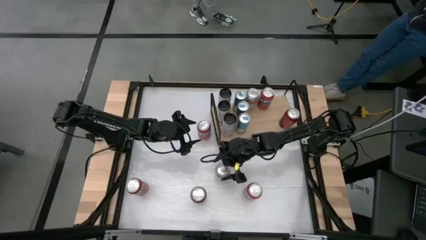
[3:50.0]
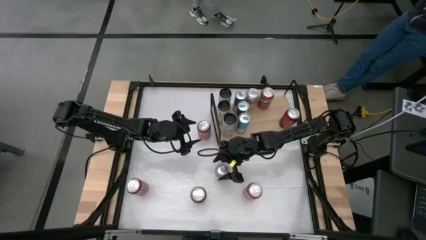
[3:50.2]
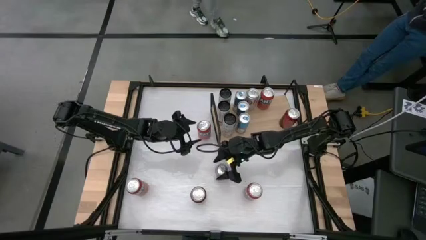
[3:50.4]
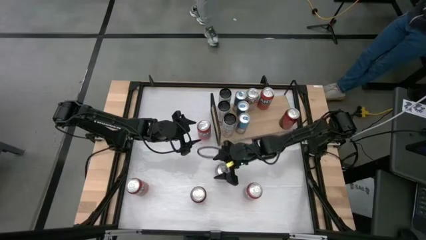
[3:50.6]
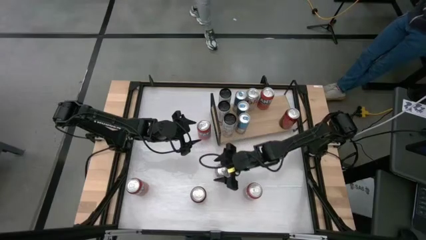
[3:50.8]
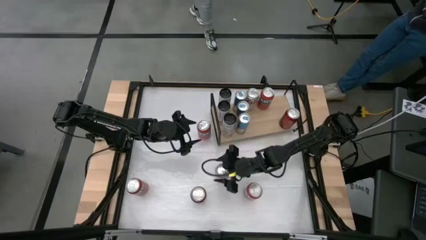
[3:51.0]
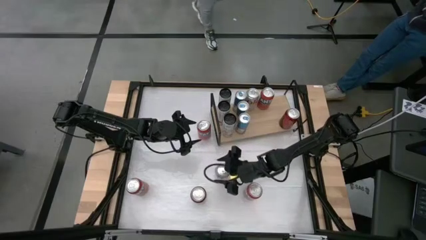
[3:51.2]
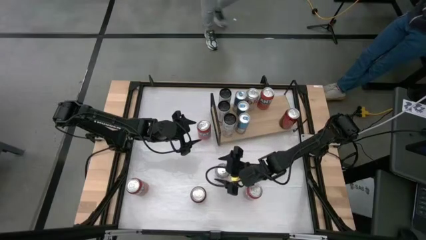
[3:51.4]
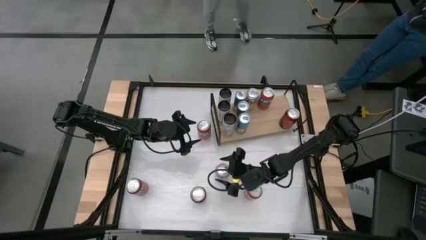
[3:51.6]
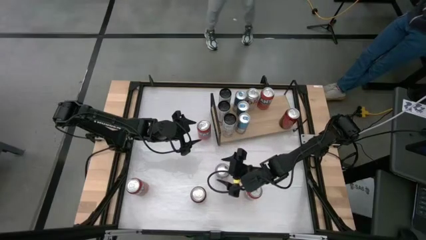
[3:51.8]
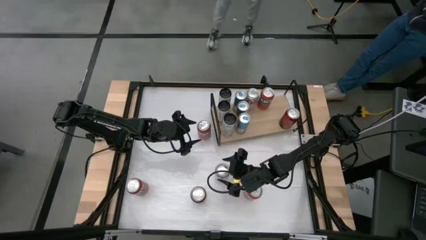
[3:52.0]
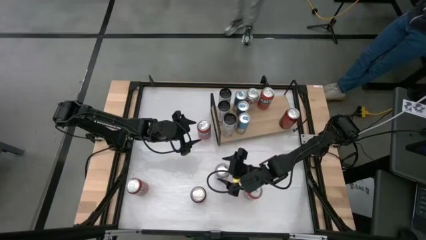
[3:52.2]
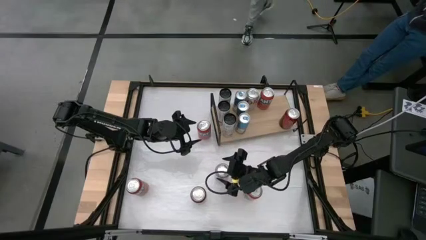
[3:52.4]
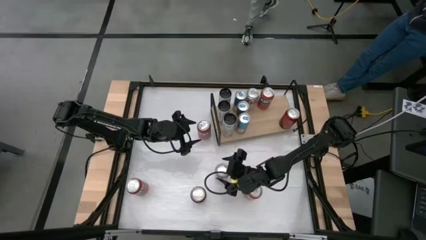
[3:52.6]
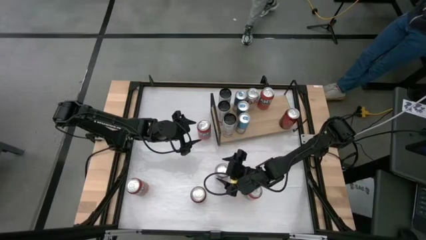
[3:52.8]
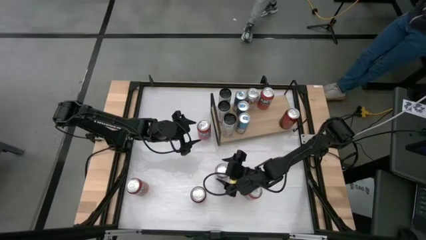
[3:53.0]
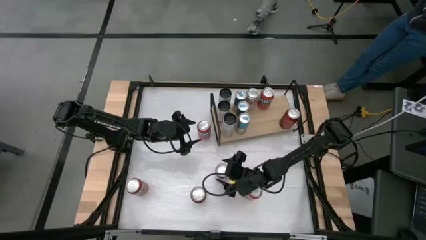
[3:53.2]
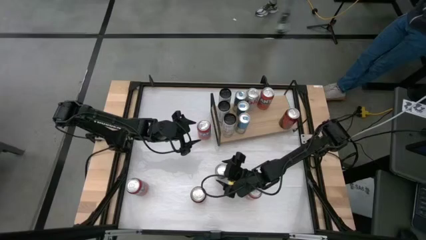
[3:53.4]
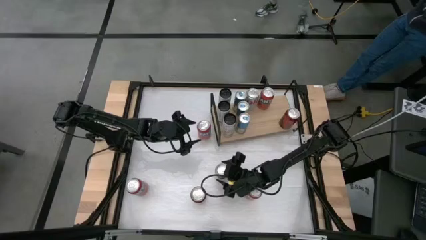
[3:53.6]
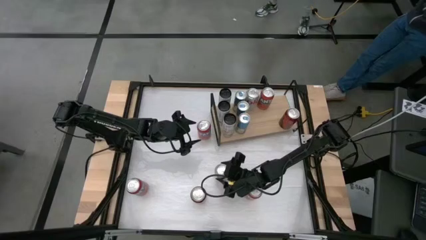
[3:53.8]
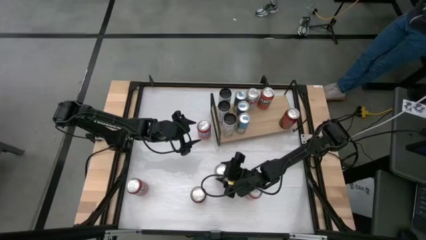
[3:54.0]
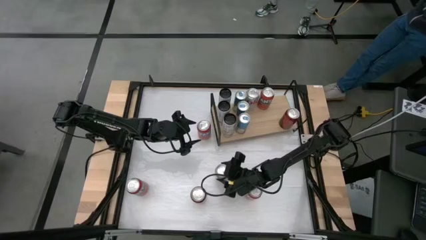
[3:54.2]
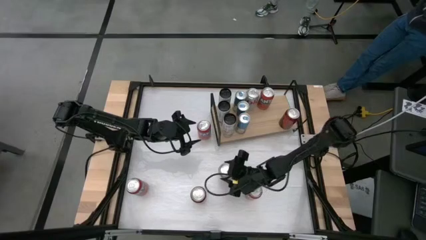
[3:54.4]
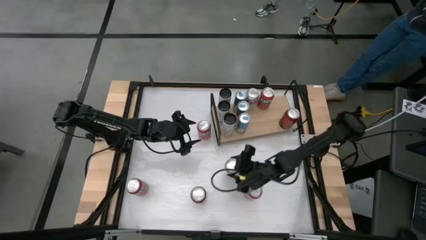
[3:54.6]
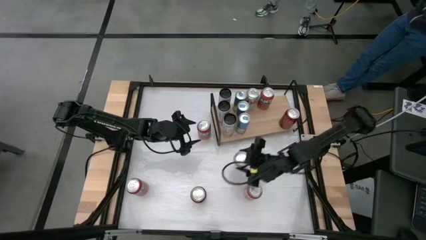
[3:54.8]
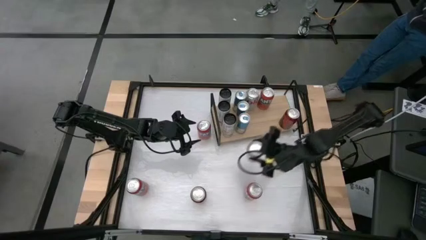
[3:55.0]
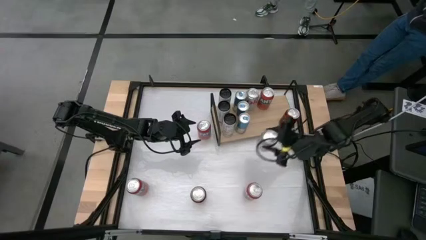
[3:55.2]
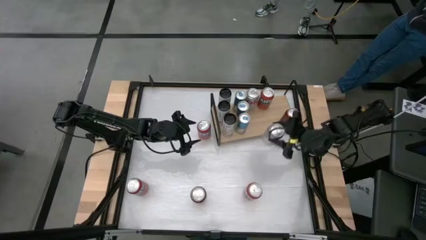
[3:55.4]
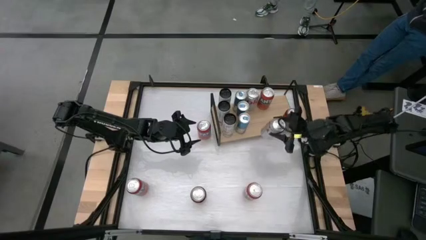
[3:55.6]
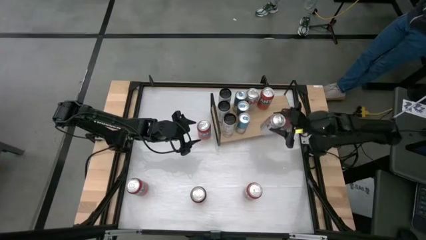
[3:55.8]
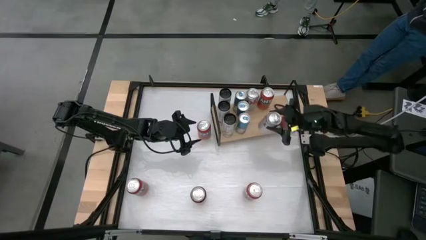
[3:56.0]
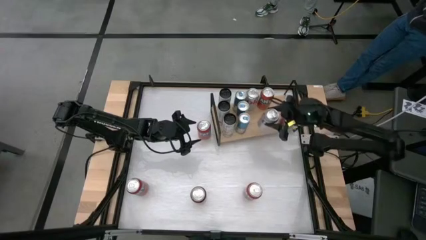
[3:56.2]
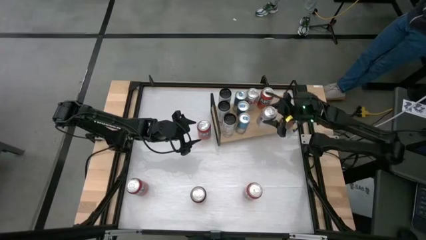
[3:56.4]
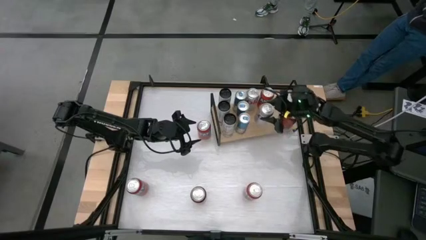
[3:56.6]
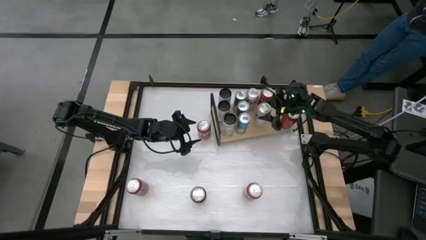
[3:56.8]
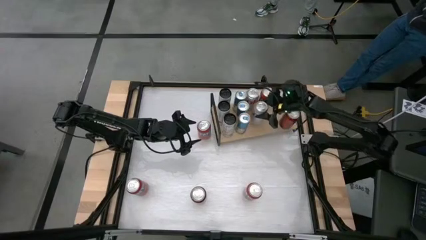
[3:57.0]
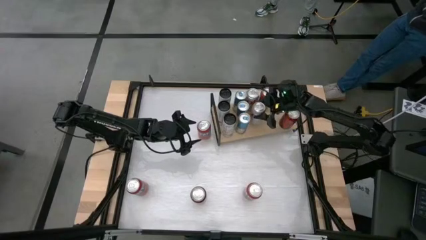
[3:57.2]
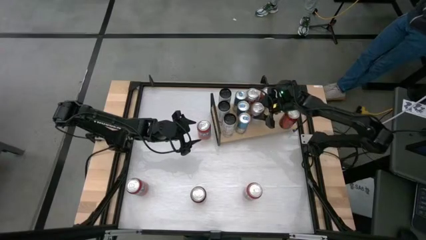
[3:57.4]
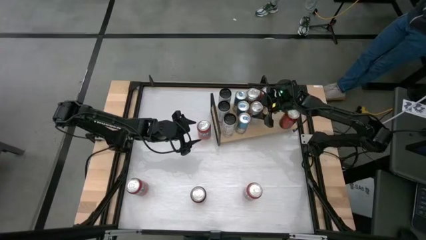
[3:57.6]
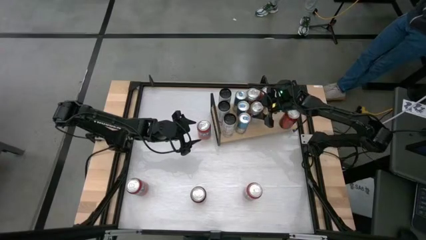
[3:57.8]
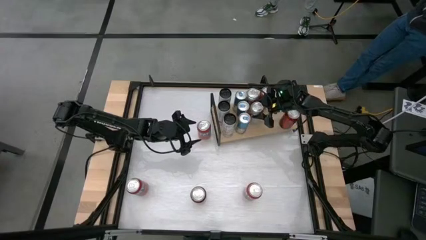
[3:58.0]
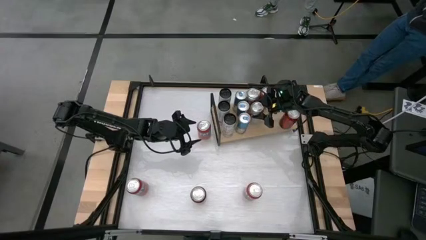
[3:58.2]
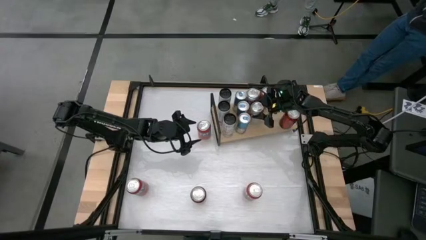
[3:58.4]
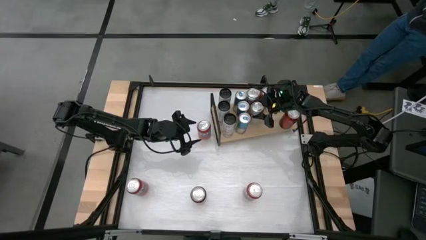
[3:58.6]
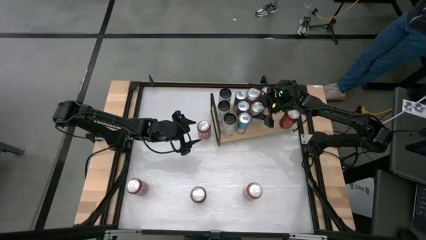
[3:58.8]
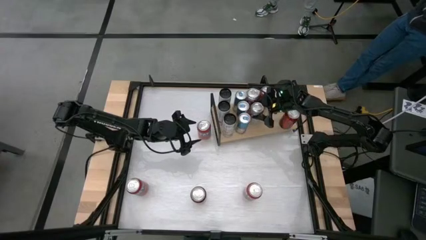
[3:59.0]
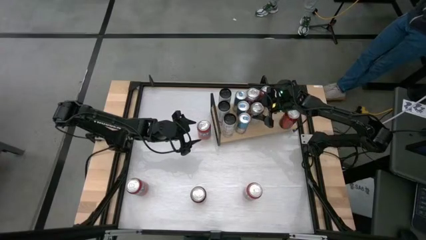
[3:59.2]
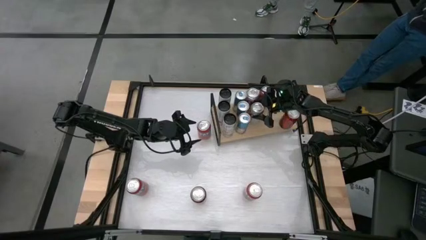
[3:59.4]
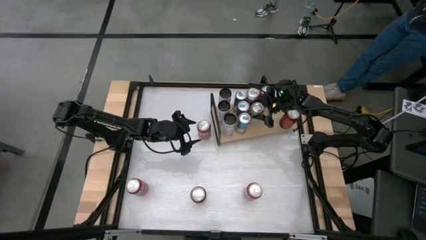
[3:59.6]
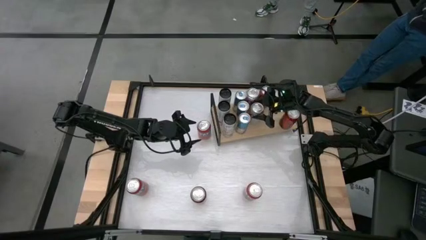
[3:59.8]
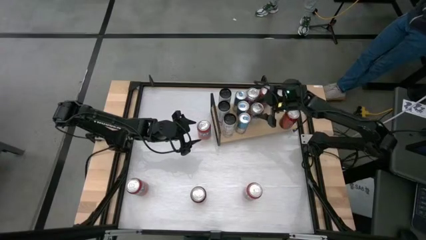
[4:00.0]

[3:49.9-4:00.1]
Task: Place canned beverage on shelf
Put the silver soda can on the shelf aligned with the other silver soda can

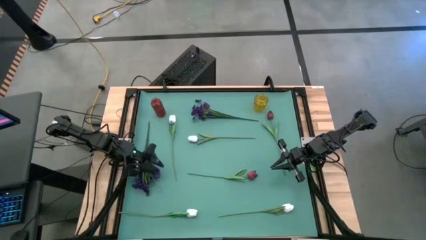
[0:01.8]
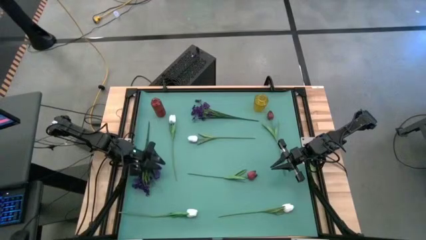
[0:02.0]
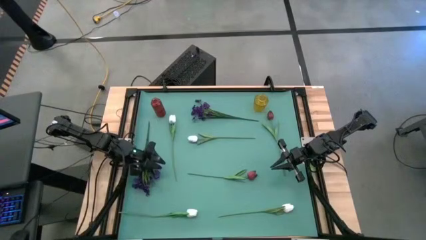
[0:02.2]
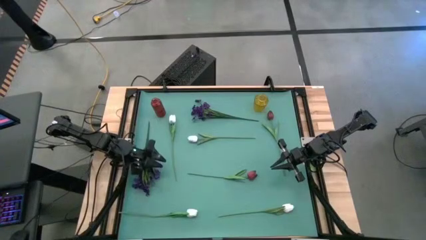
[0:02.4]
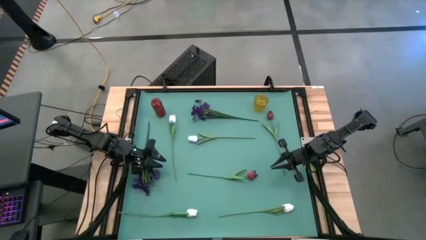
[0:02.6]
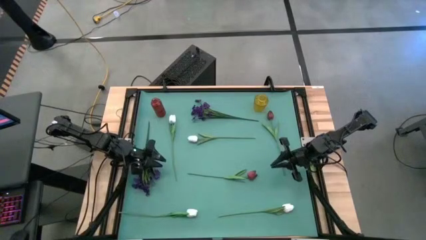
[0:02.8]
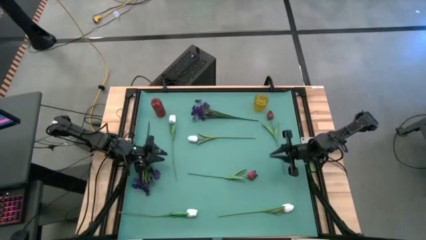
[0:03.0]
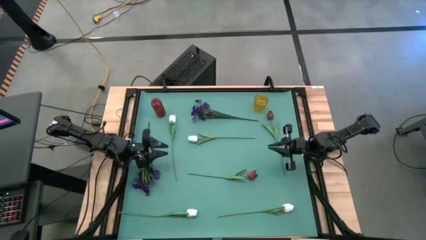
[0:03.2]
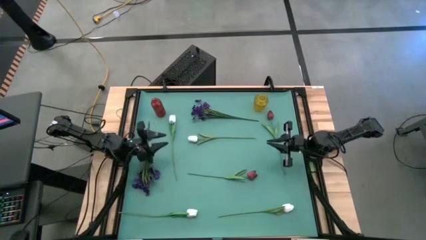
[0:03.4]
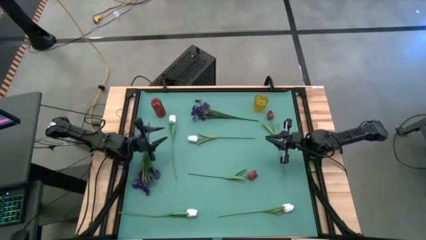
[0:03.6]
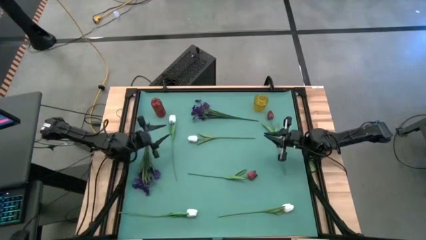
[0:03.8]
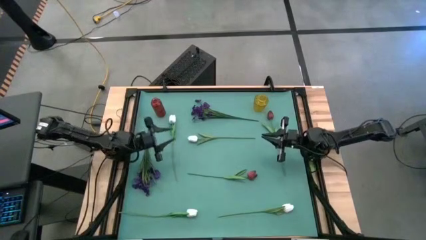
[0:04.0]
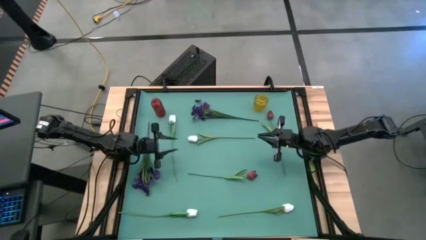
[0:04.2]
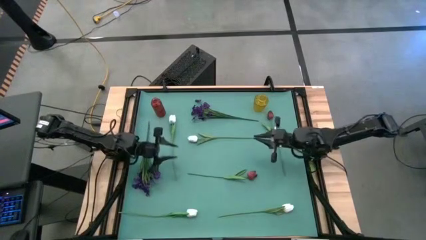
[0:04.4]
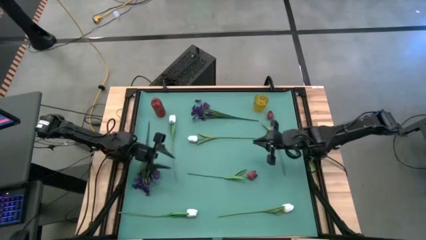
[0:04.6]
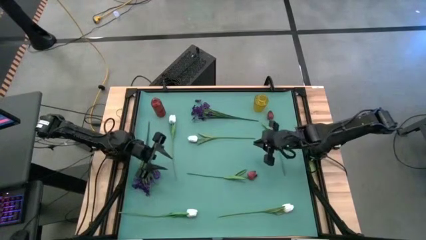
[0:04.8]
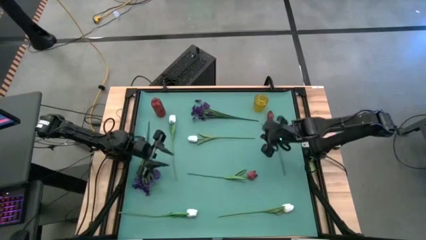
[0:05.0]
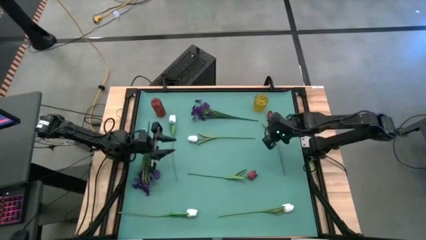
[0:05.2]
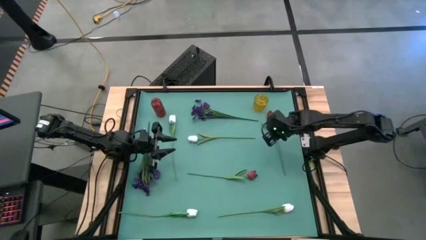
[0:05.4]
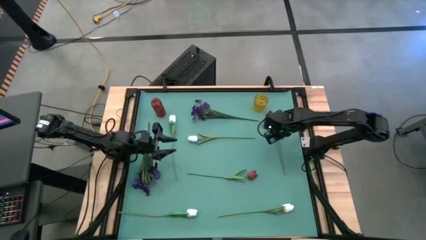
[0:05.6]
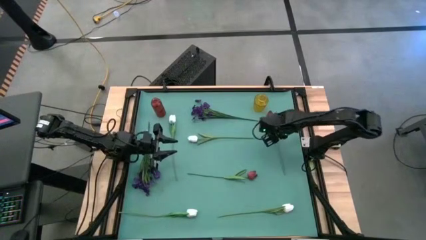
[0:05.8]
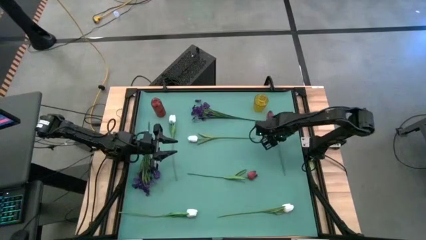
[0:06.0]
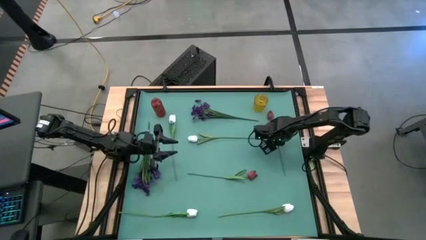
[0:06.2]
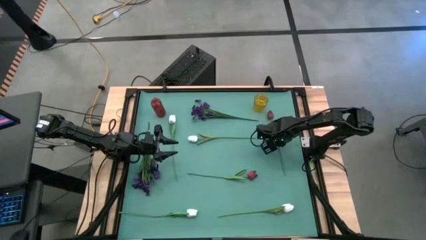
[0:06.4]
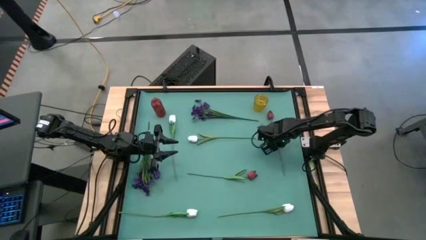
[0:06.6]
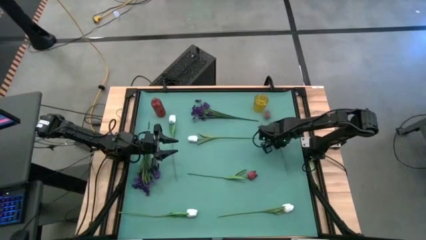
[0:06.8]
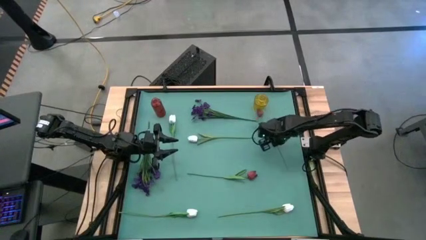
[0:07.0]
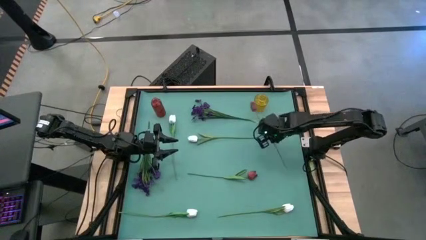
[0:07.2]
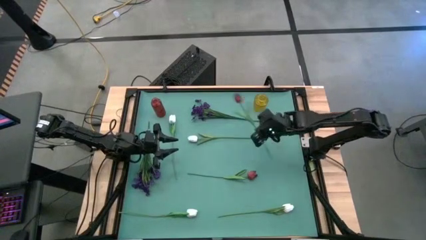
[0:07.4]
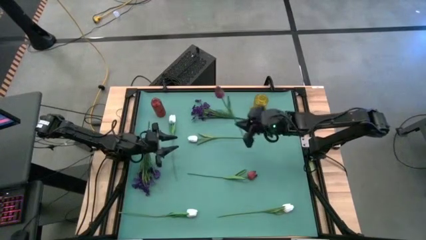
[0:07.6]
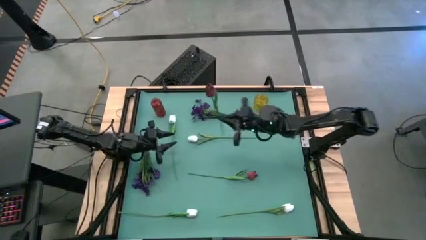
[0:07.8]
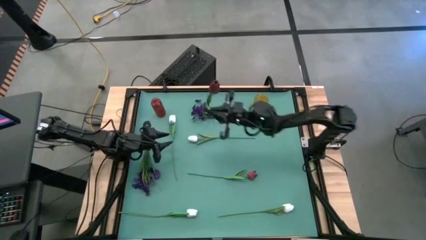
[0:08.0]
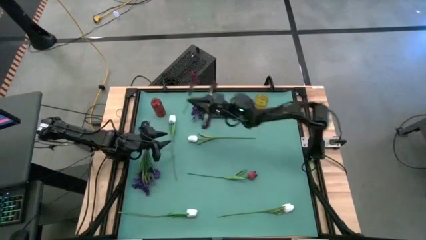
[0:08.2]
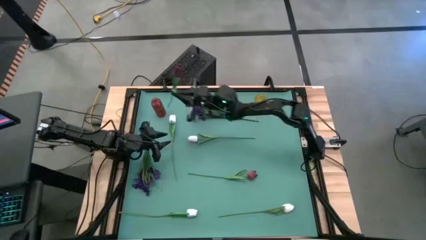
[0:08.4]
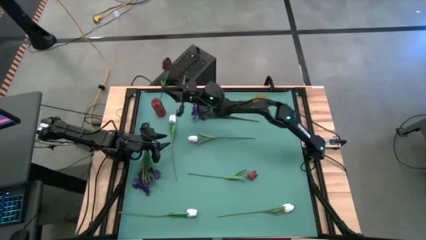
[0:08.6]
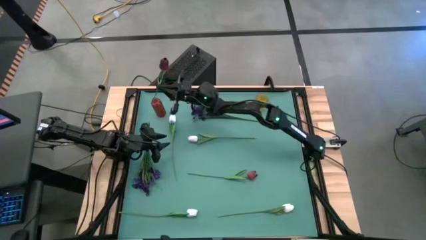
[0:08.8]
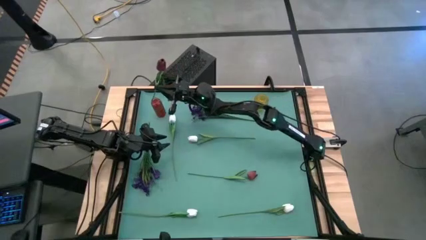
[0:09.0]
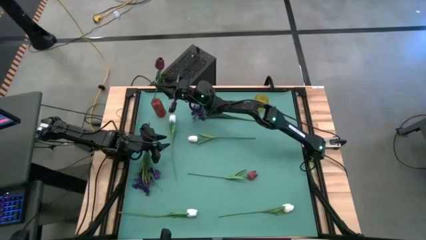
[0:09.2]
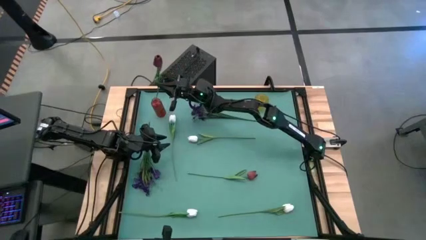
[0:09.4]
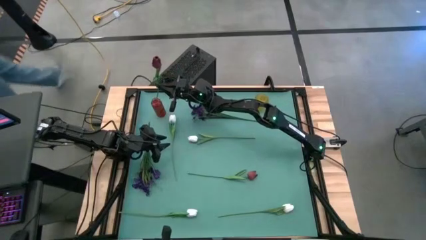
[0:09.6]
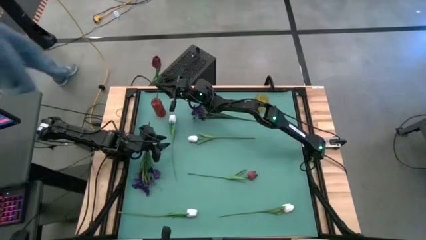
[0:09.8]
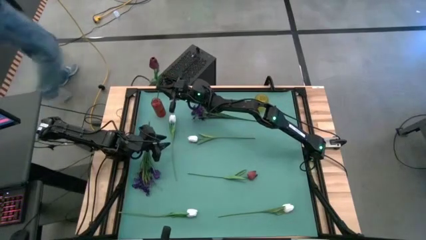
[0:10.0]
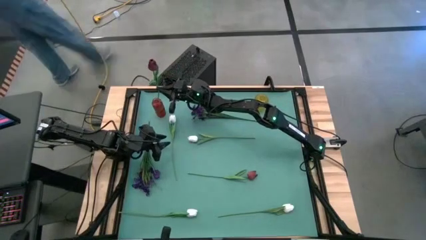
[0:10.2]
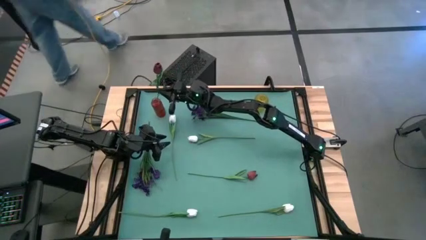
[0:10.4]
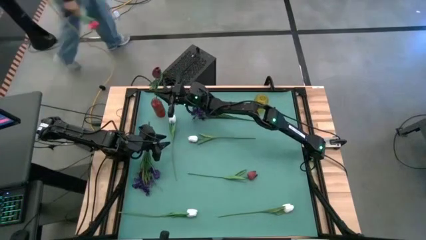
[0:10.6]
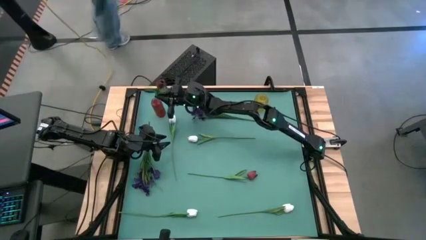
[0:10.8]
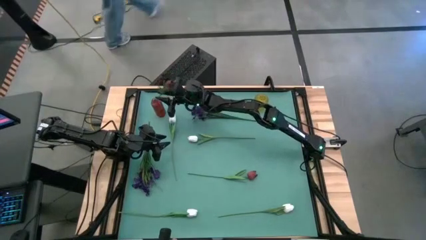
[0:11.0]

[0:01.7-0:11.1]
Task: Sort flowers into vase by color
Put the right red tulip into the red vase
